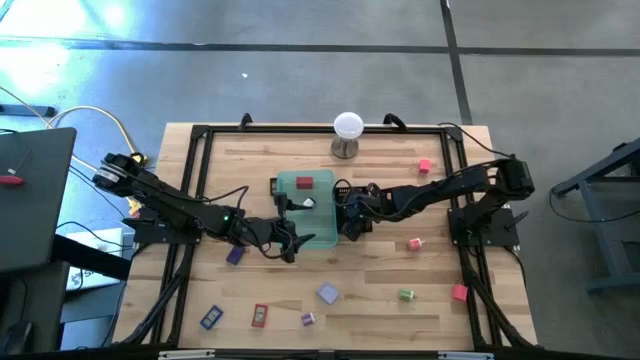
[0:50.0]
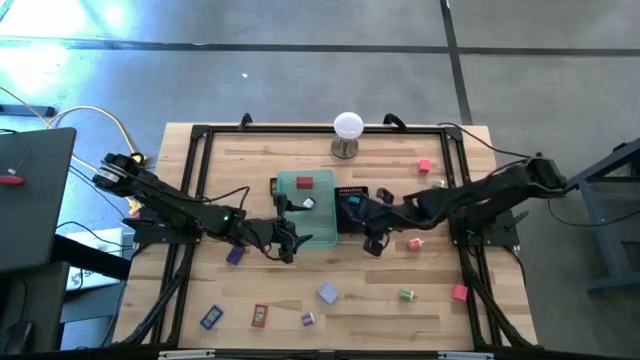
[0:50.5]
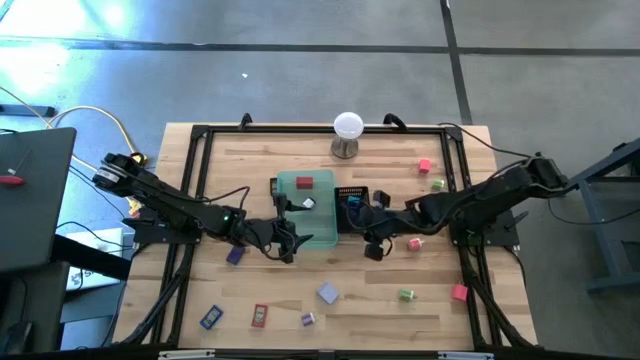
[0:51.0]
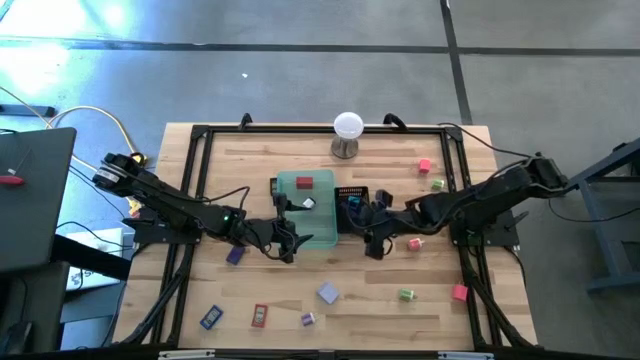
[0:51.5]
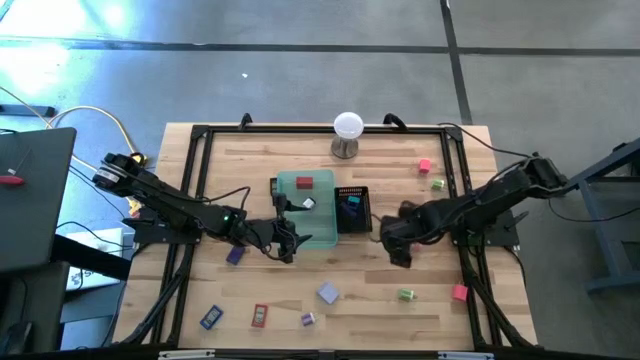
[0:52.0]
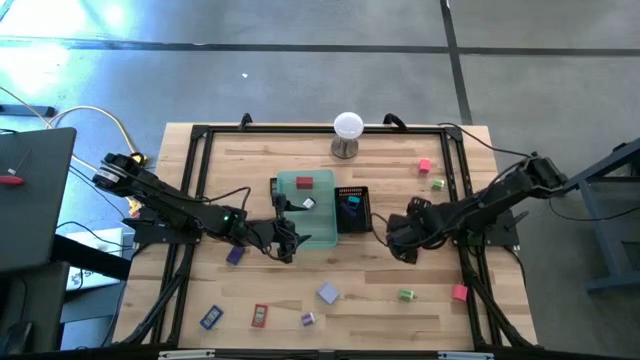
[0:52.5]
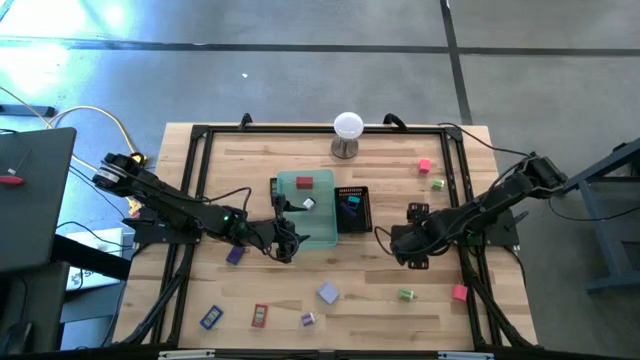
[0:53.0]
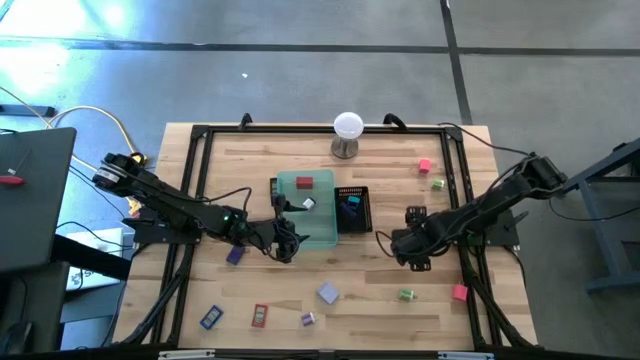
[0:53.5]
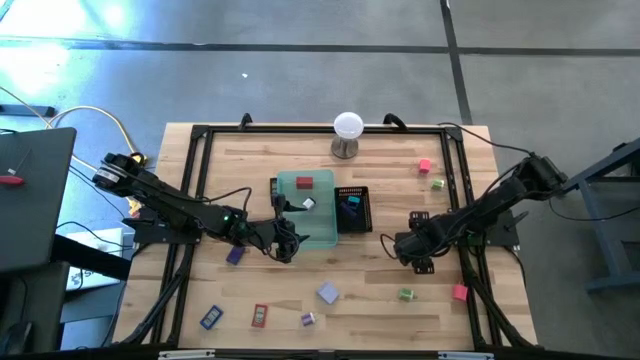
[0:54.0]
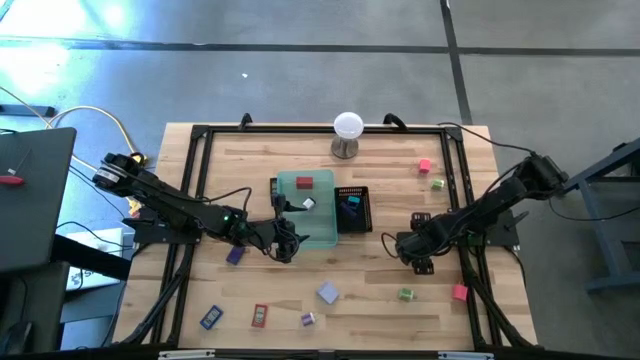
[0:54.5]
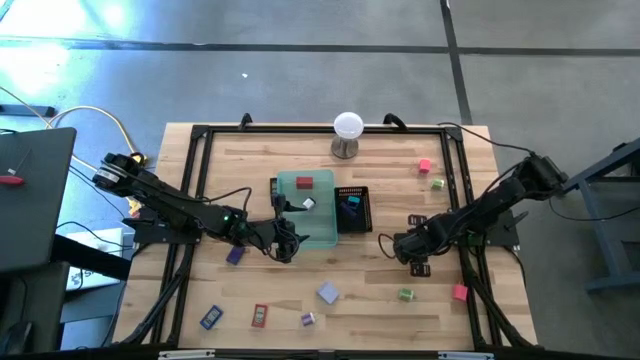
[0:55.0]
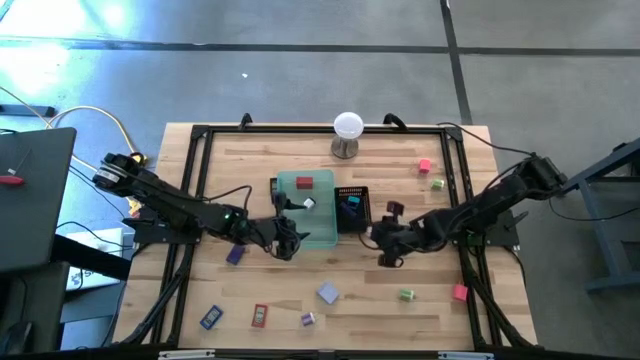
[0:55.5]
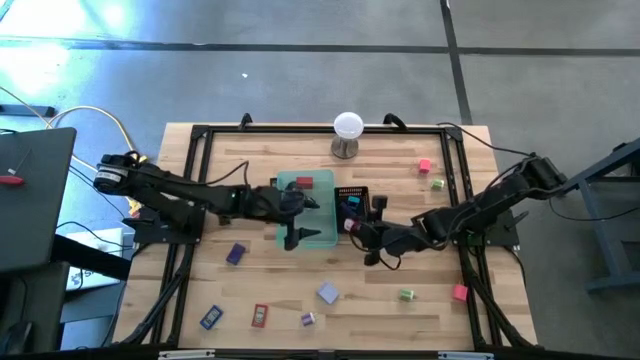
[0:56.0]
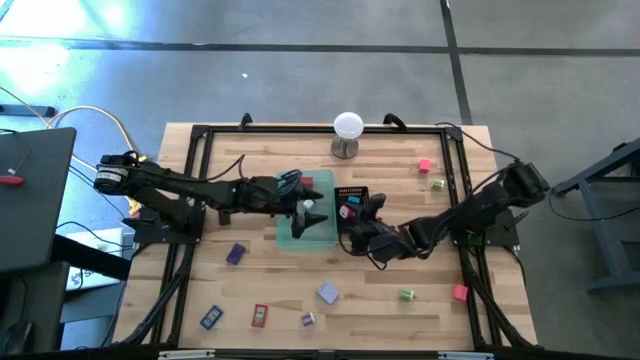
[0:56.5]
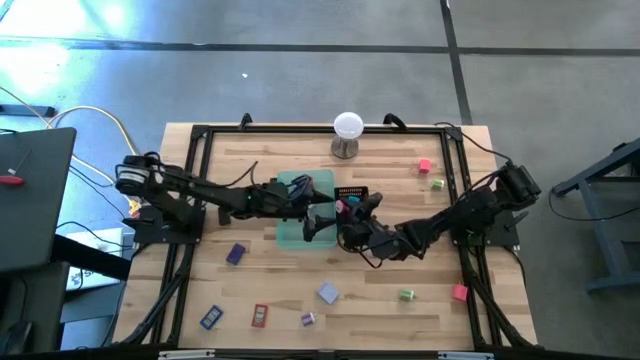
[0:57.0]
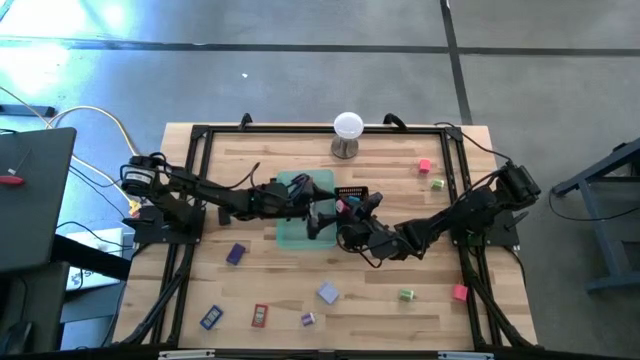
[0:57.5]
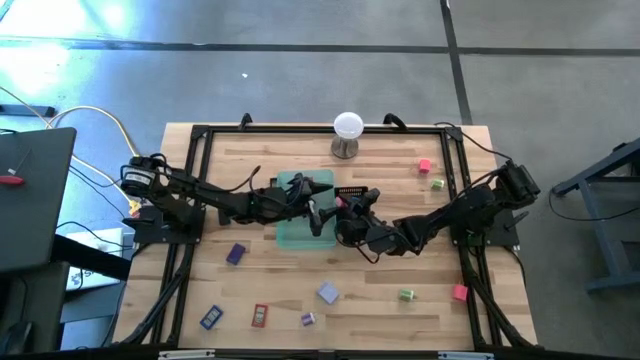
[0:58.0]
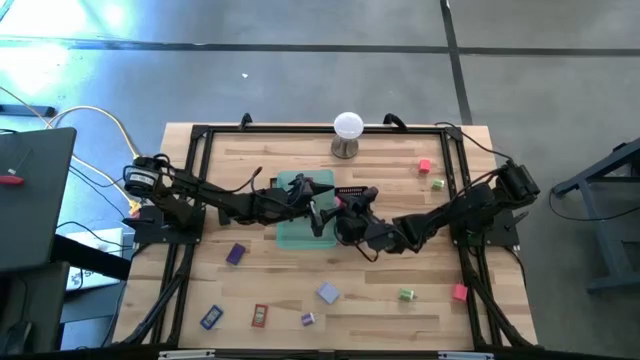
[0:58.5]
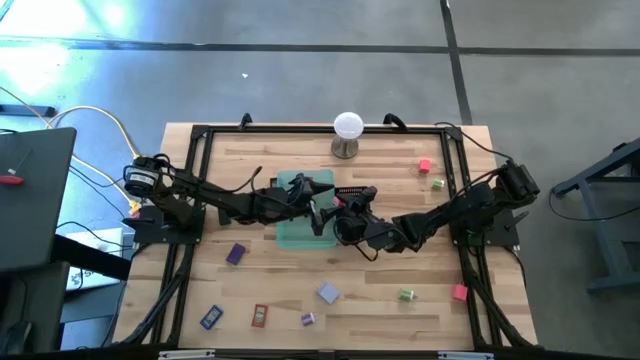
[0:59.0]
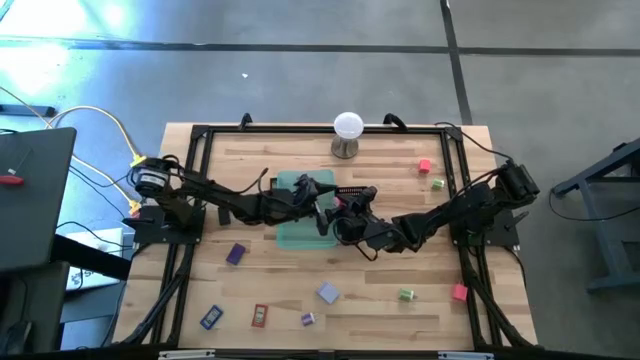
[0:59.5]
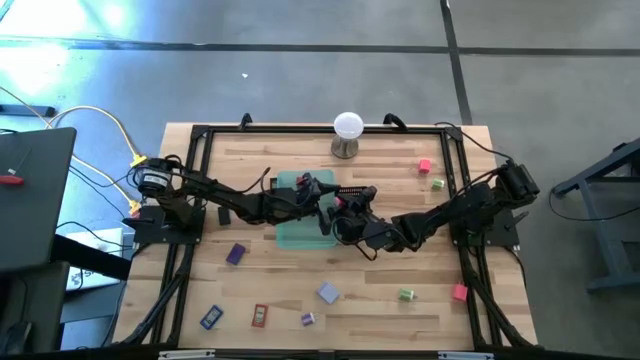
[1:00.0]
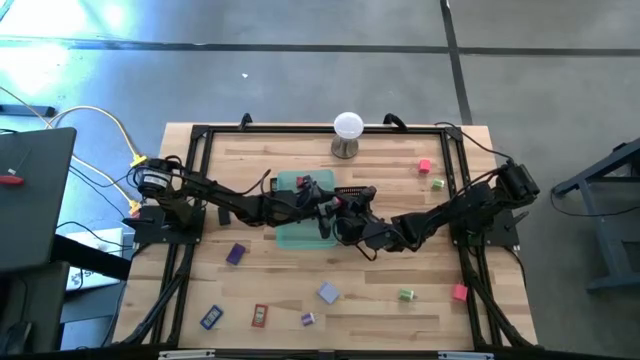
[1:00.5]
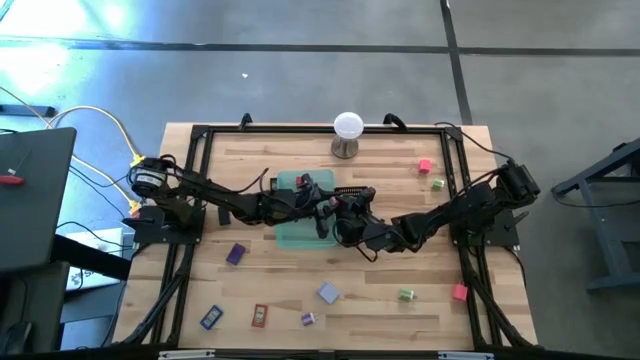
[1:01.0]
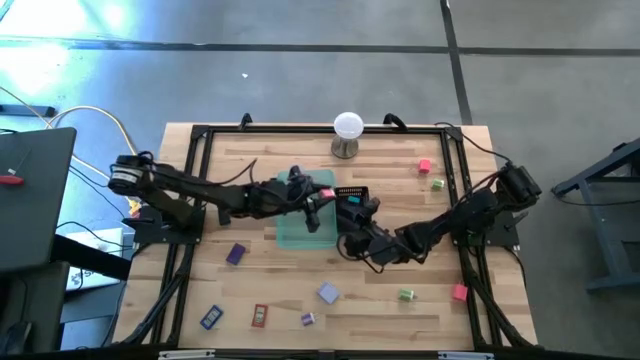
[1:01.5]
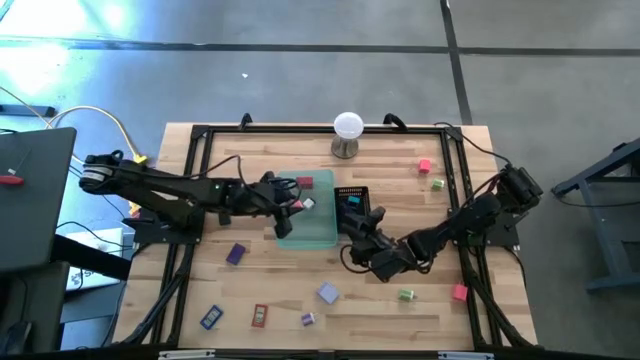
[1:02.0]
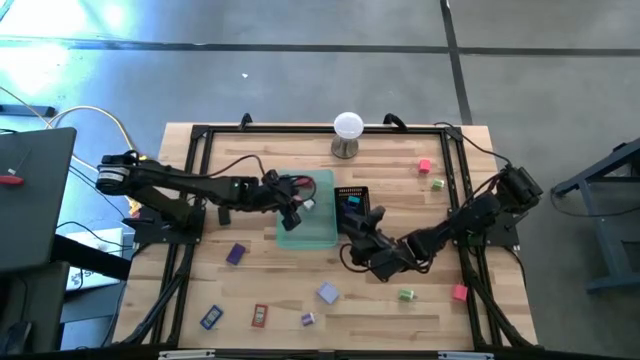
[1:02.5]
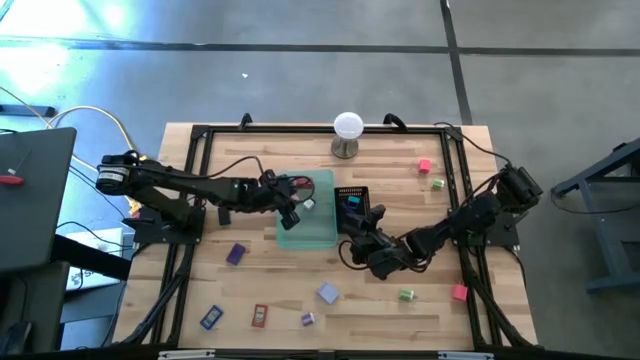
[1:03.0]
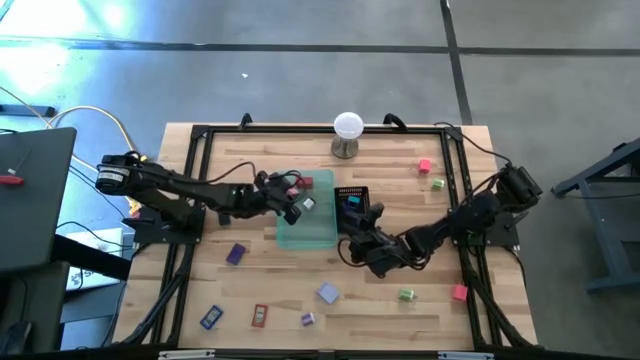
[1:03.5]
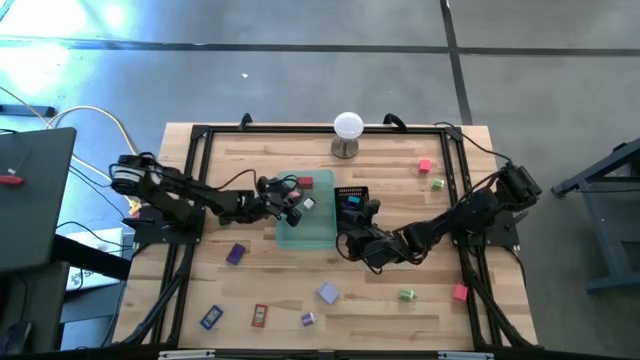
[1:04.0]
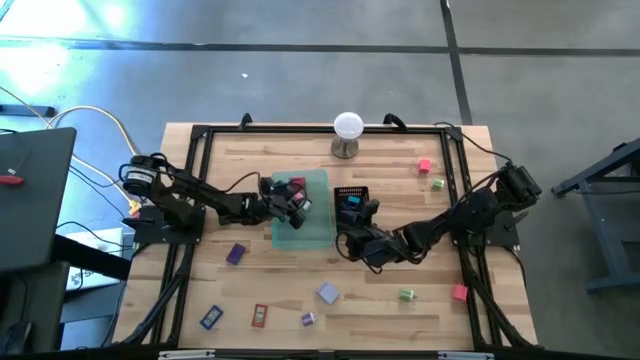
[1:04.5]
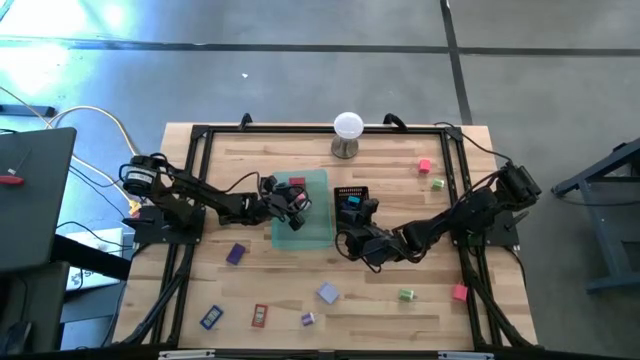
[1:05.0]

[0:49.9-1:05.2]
Task: Pick & Place Office items
Put the pink and white charger adapter into the blue bin

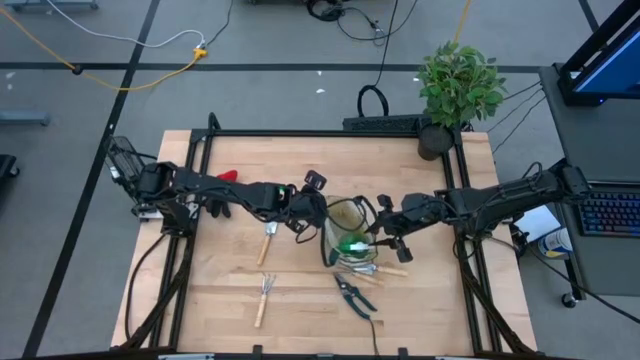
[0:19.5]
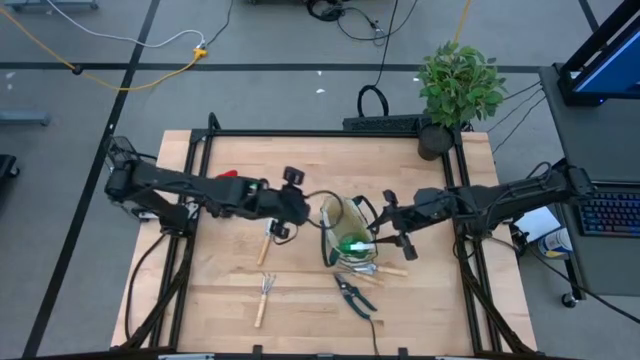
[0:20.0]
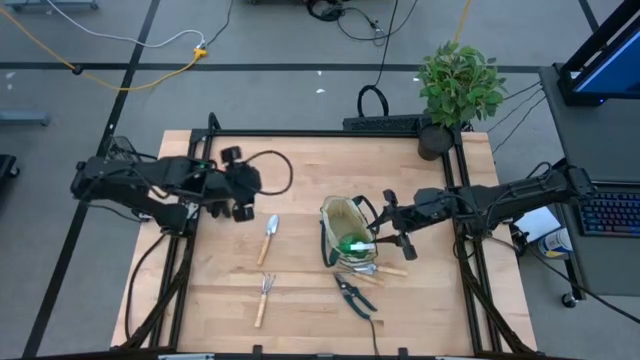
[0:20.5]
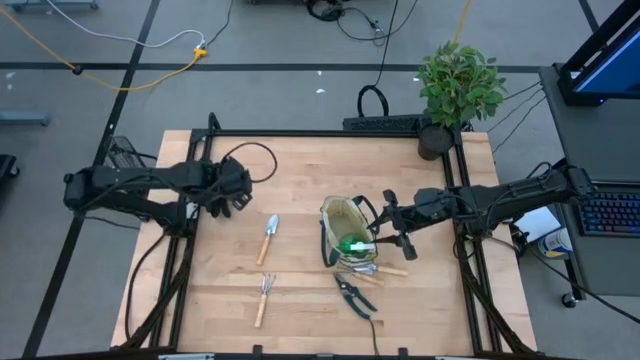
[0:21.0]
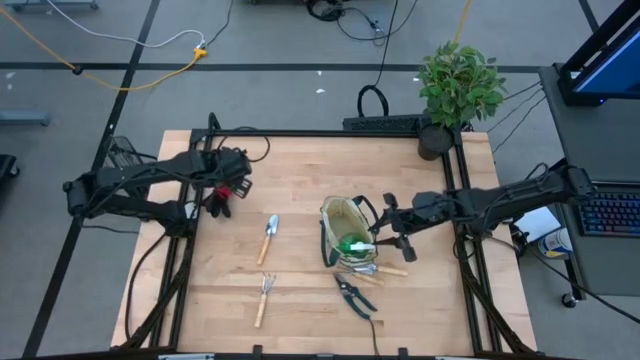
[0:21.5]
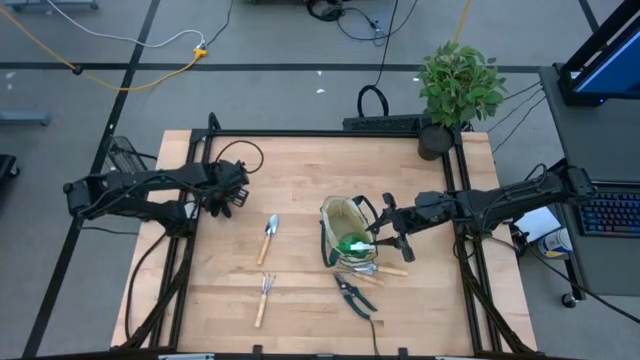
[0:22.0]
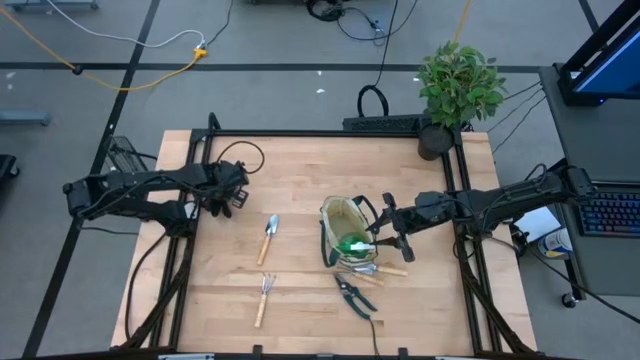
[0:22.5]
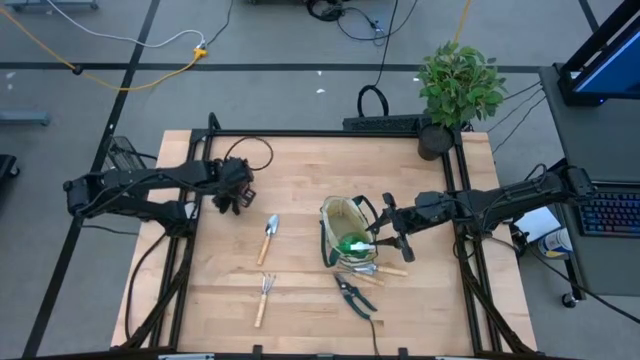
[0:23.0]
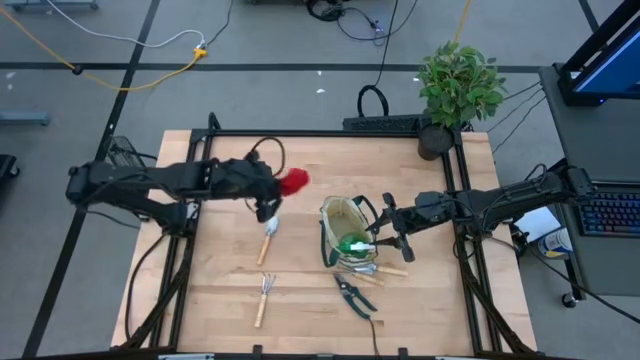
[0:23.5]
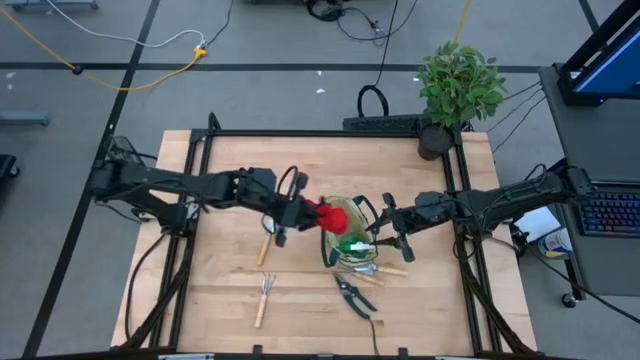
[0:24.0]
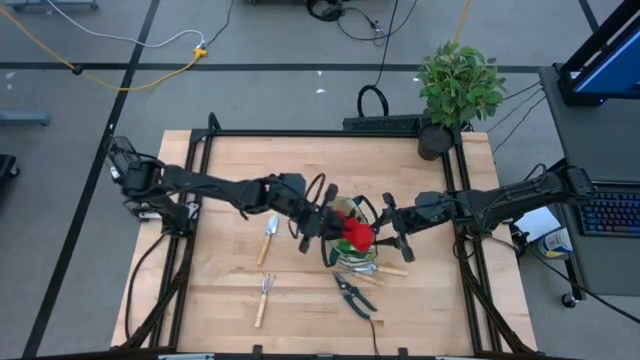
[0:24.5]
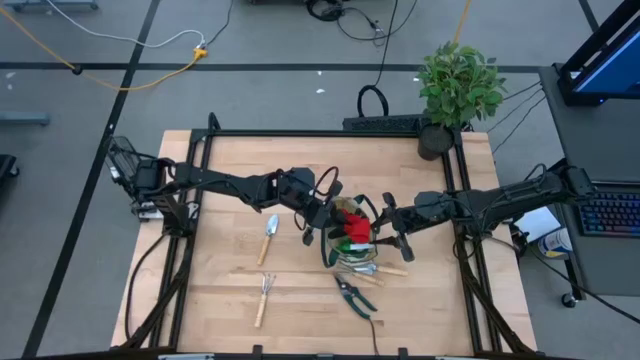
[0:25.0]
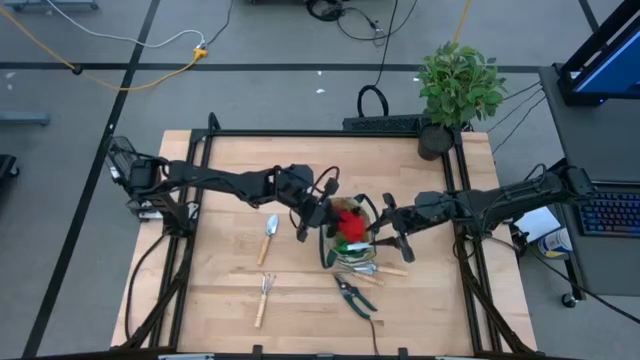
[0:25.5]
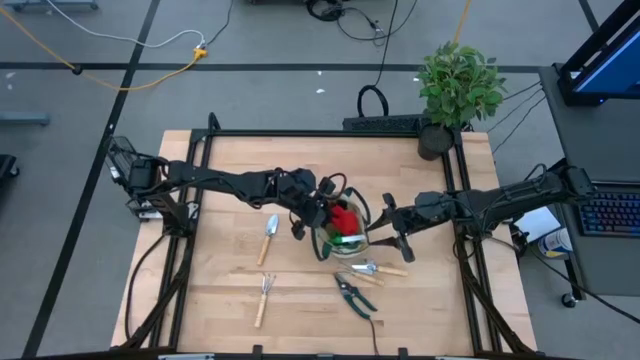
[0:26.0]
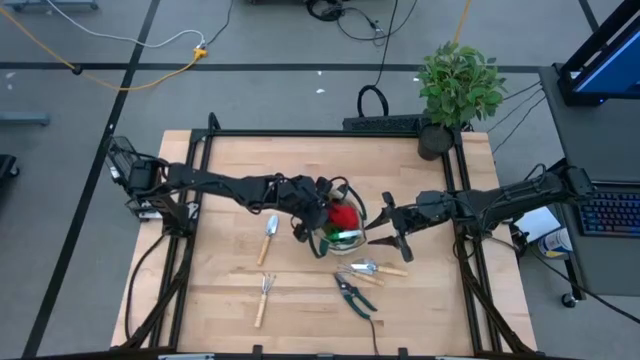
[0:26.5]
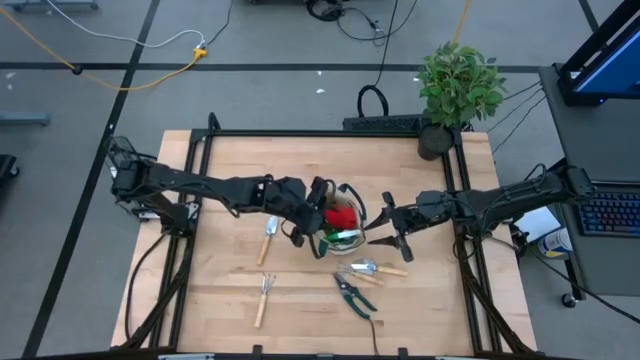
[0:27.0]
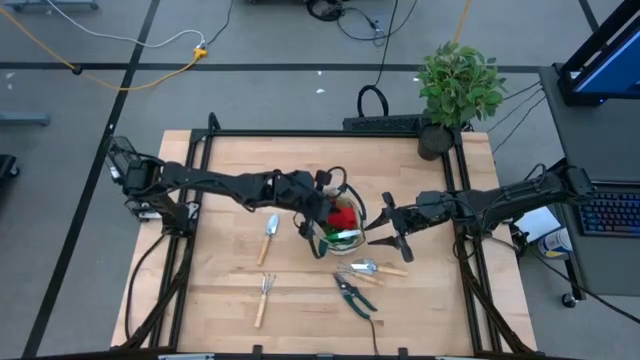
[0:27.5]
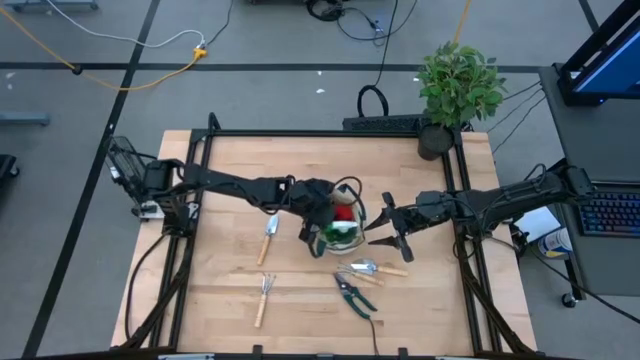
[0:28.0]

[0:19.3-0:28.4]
Task: Pick & Place Garden tools in Gardening bag
Put the red gloves into the white gardening bag
